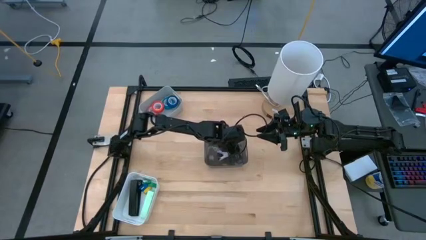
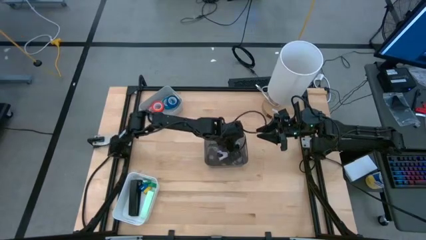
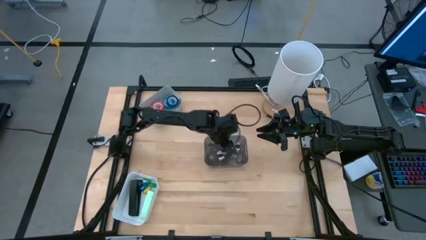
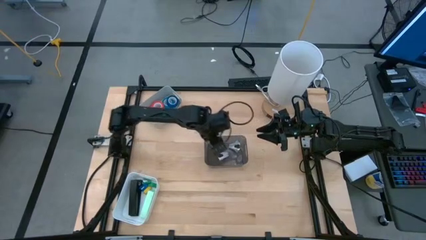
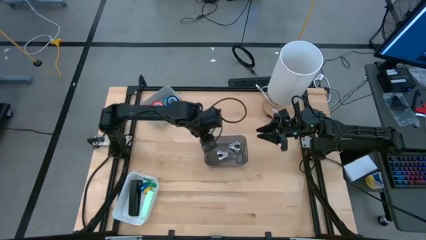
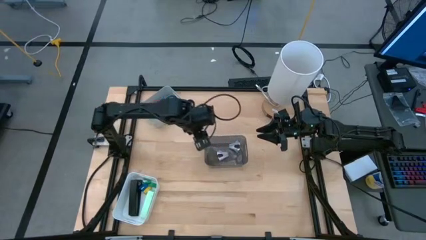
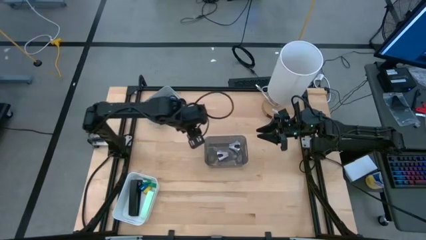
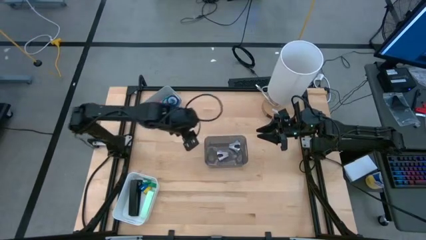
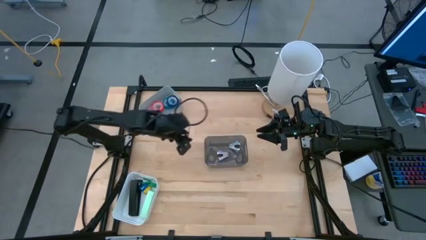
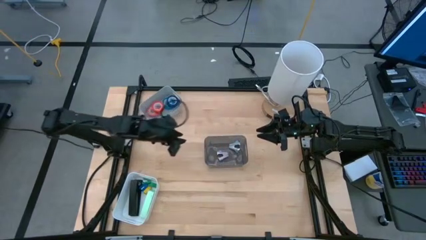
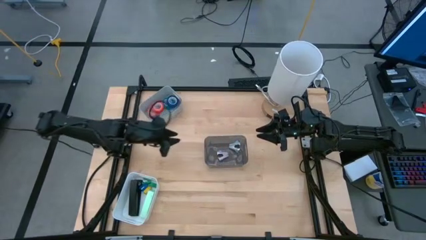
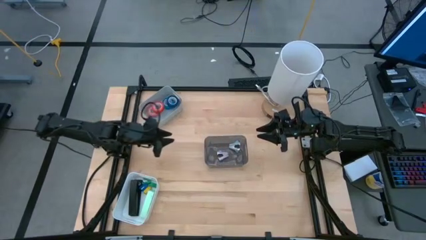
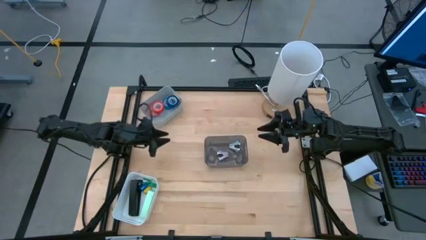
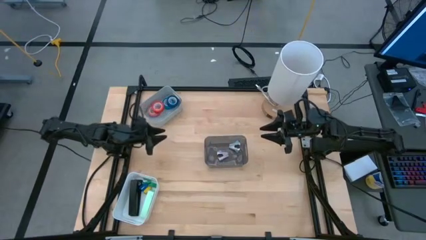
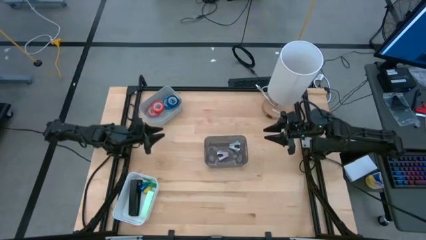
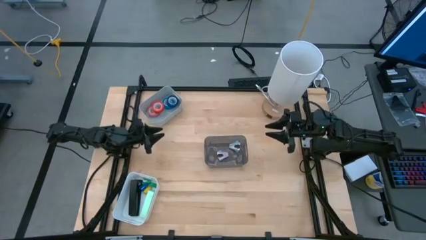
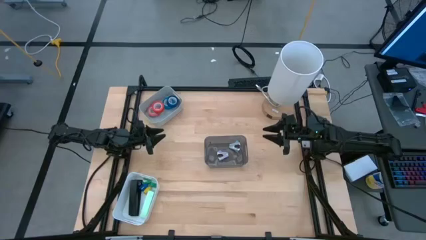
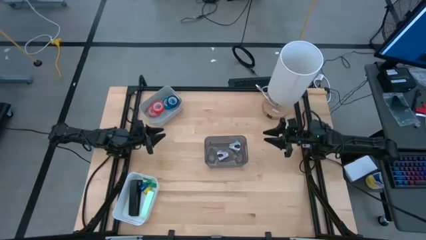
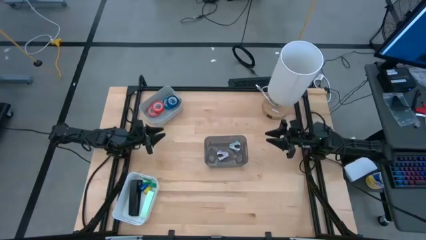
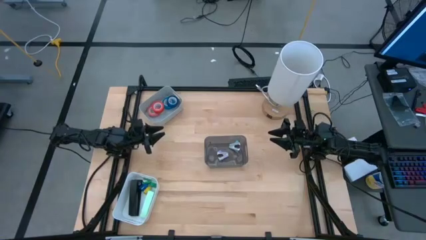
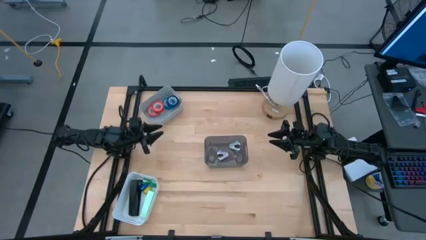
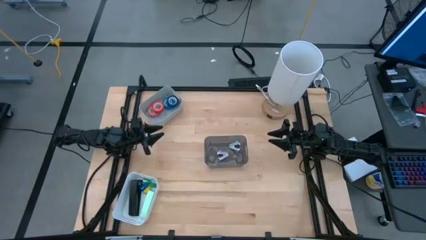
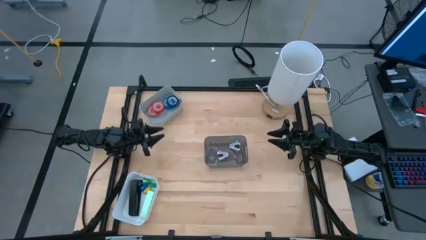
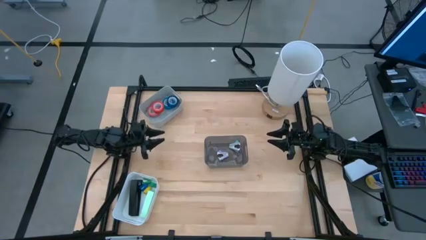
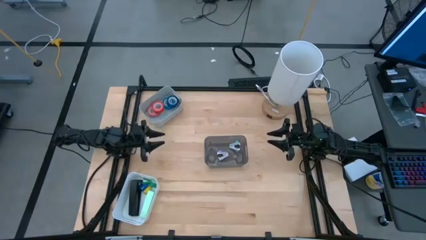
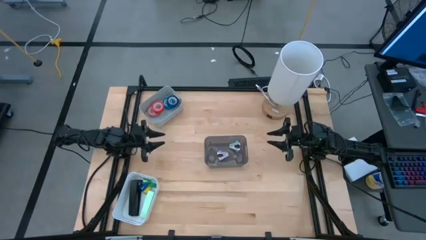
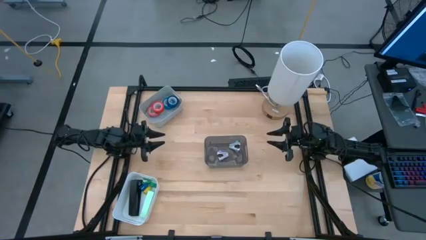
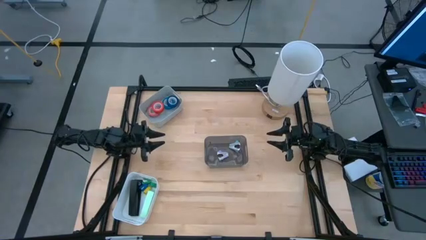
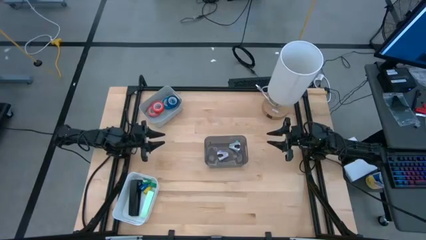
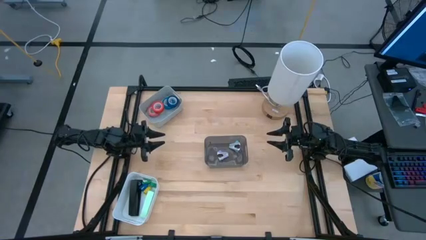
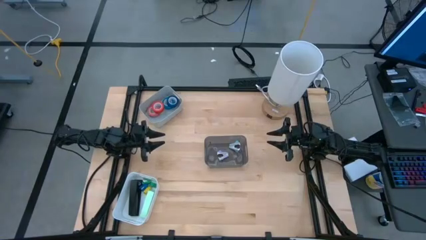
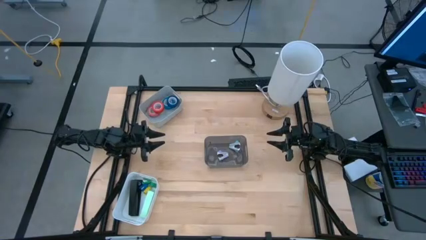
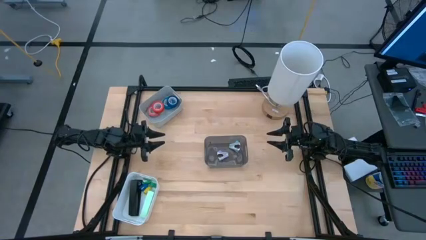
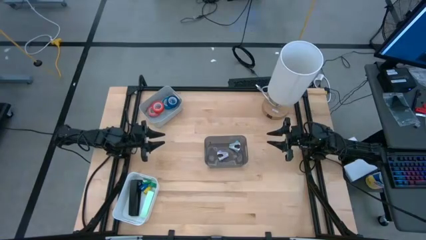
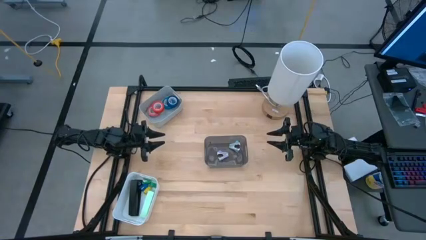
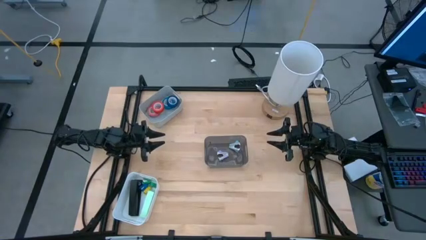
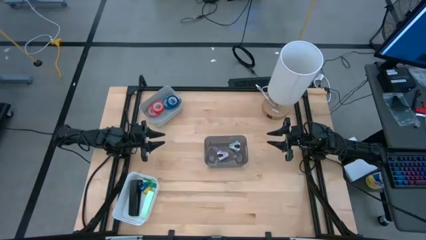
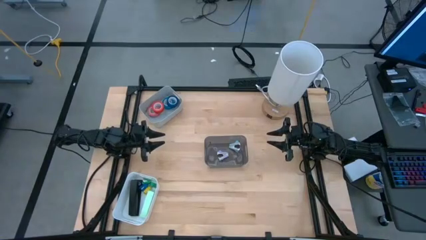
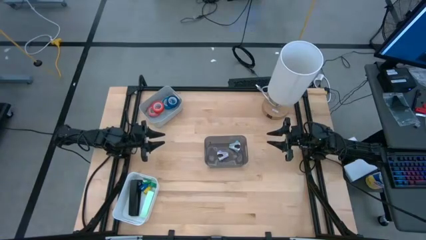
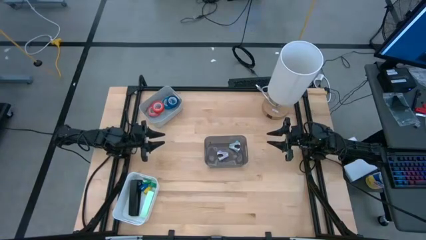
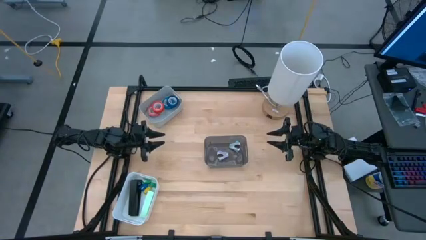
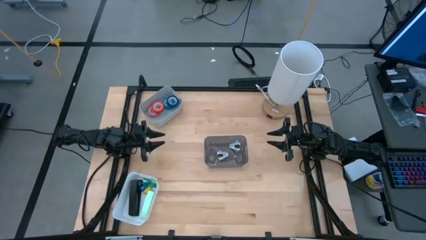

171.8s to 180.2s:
Task: Pick and place Stapler, Stapler remover, tape
Return to Home Position

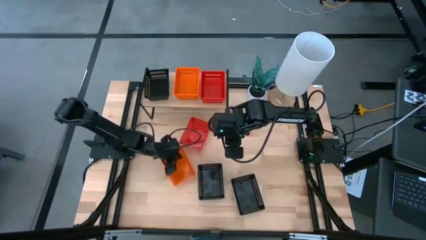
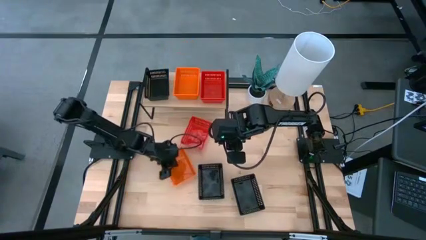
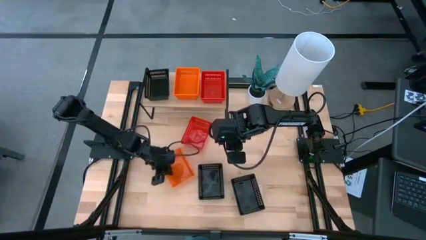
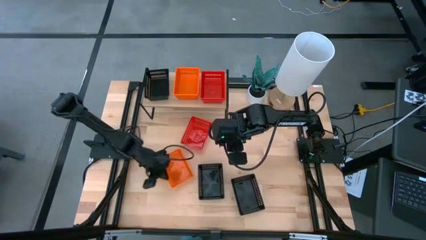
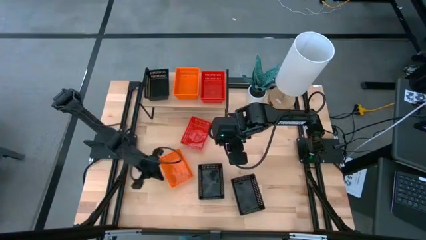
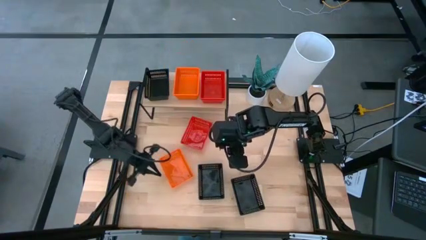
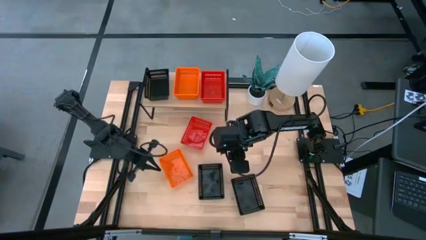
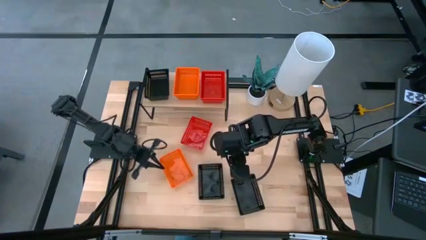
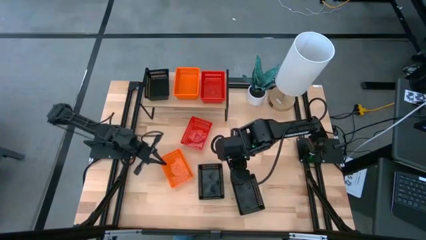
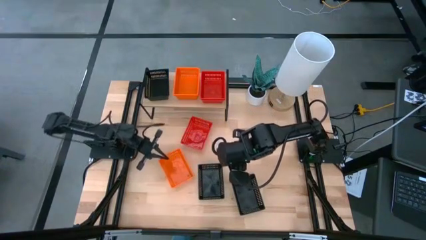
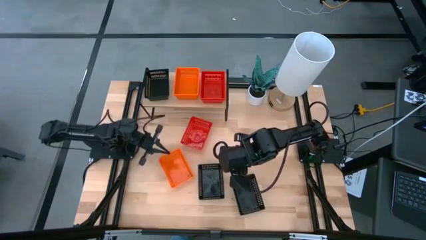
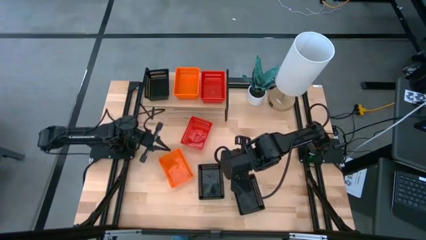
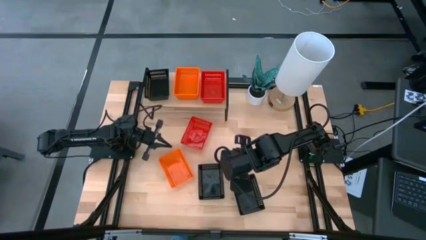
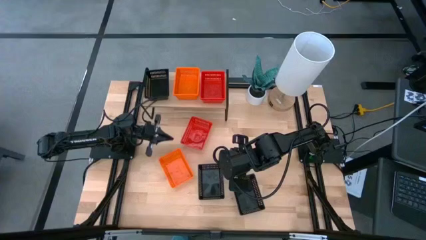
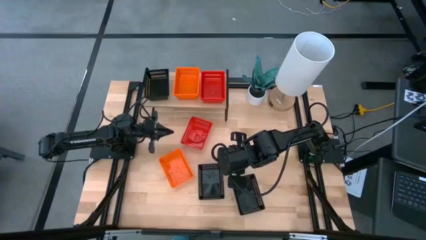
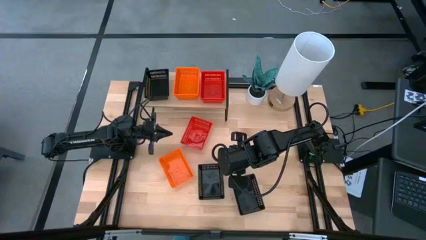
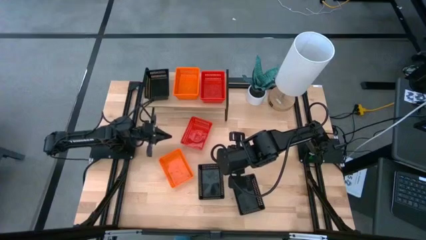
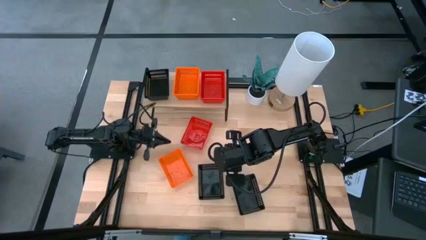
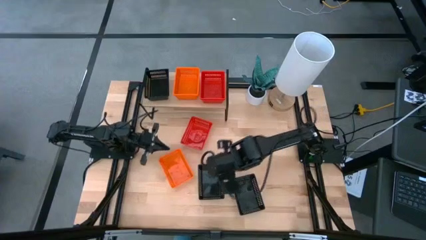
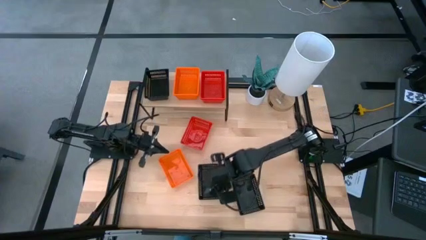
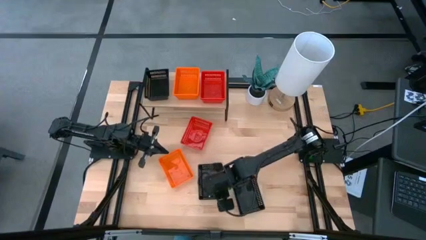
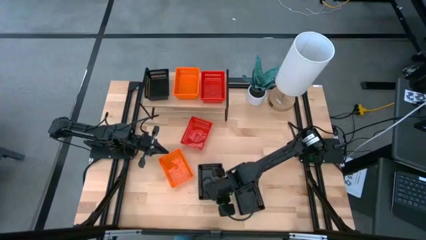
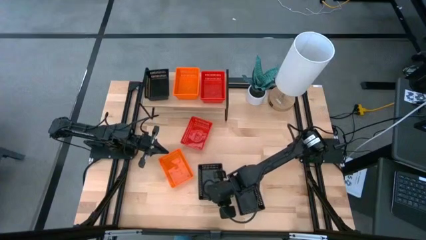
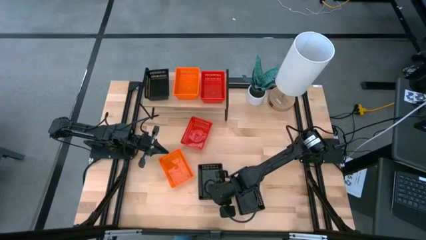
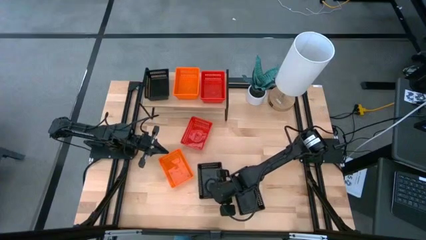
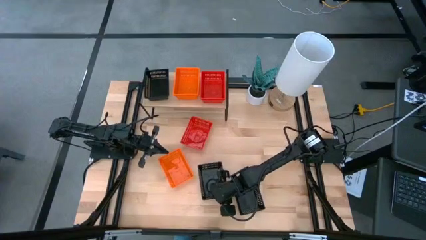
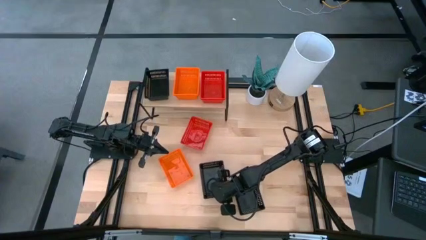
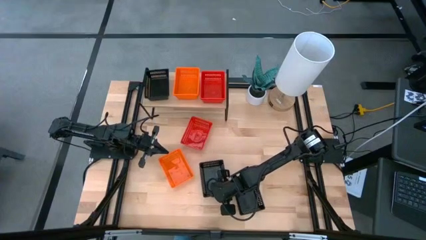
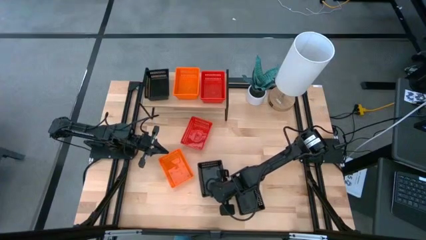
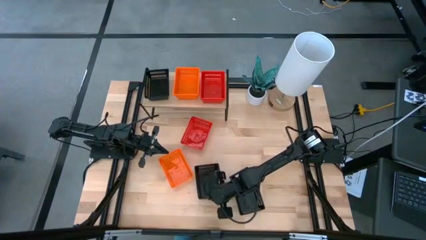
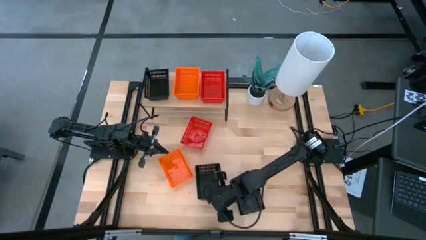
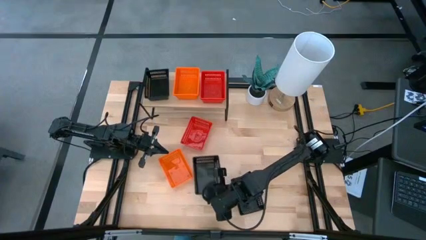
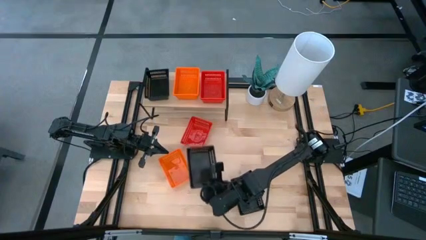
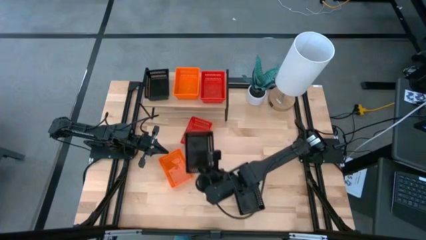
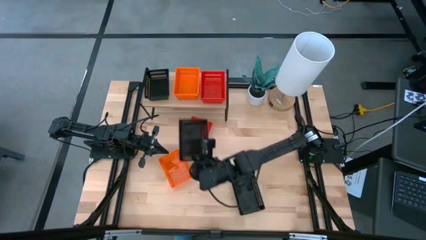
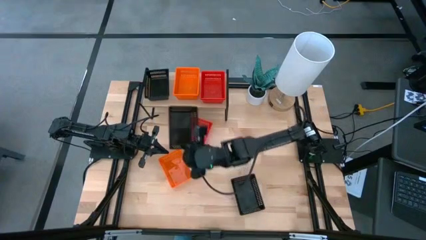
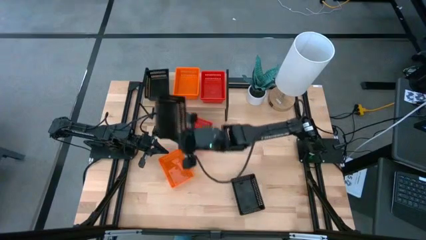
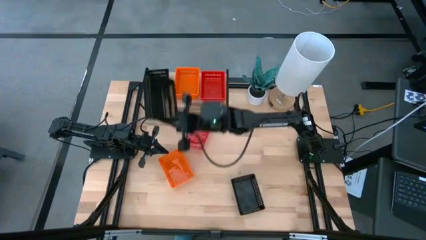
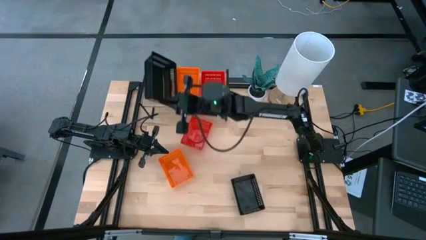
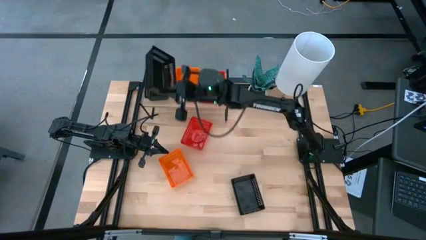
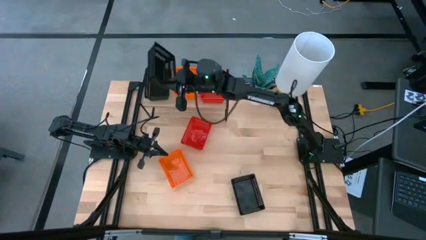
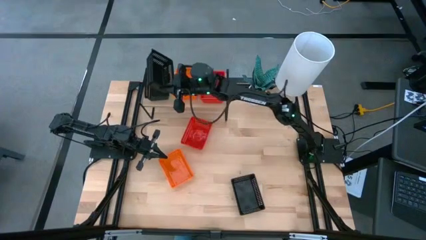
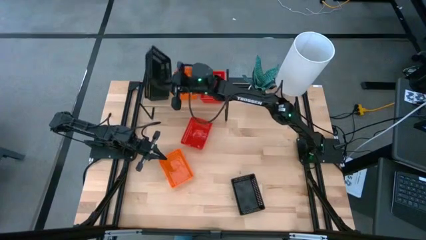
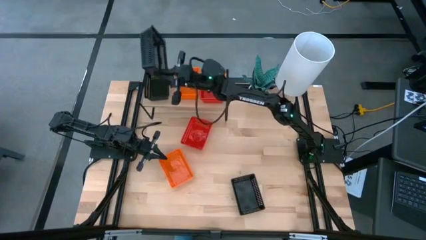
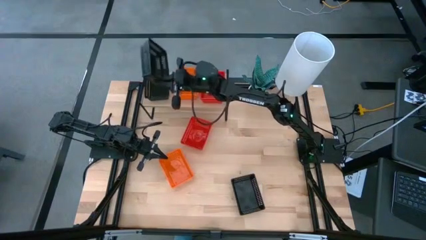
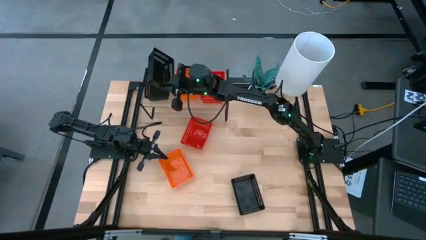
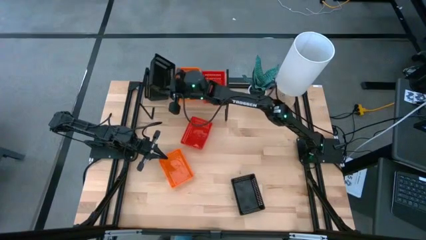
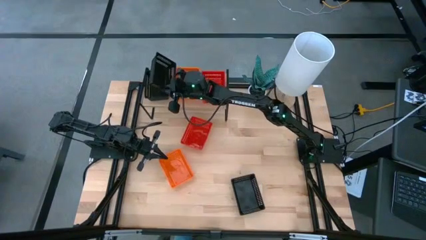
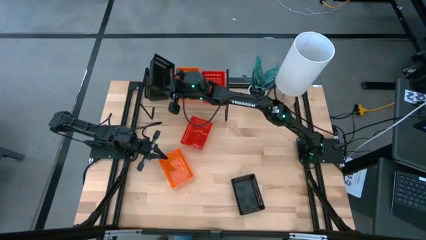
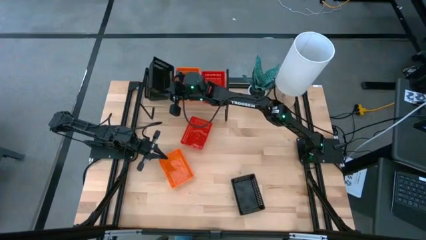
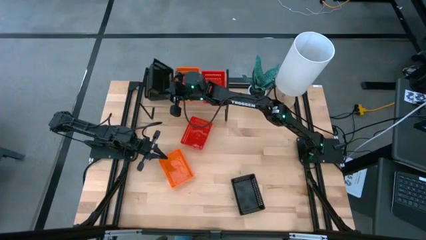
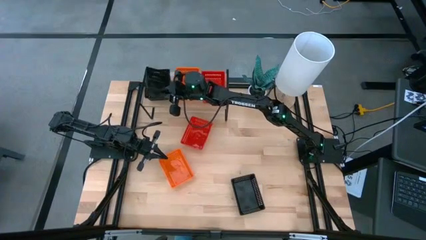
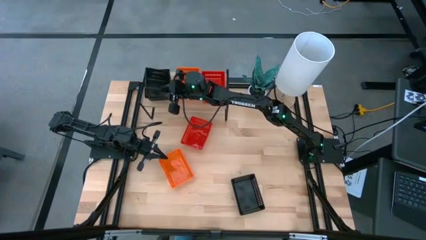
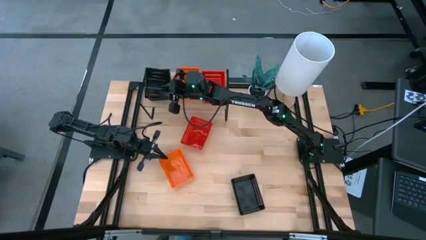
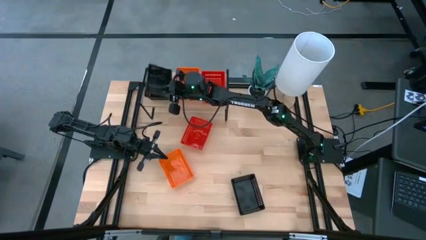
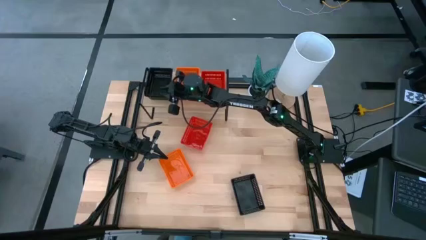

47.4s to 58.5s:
Task: Stack baskets on shelf by color
Stack the left black bin on top of the black bin on the shelf
